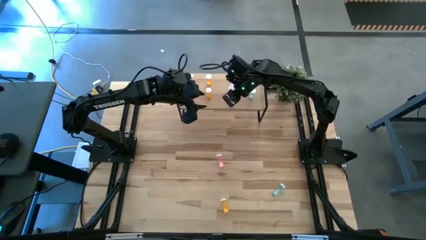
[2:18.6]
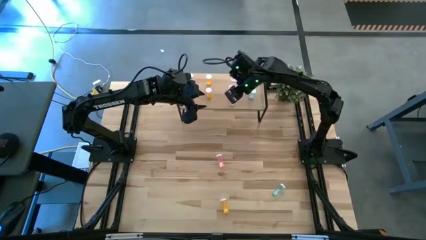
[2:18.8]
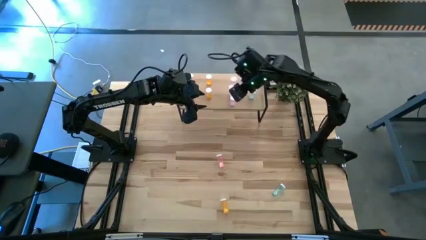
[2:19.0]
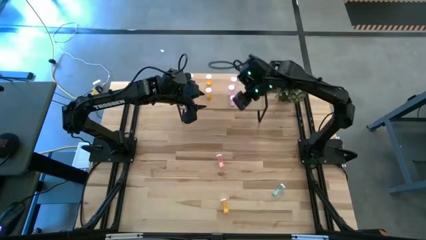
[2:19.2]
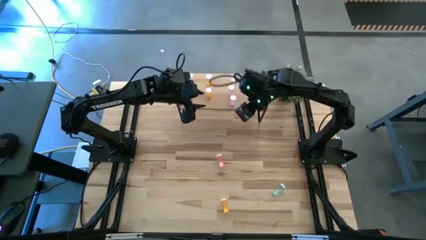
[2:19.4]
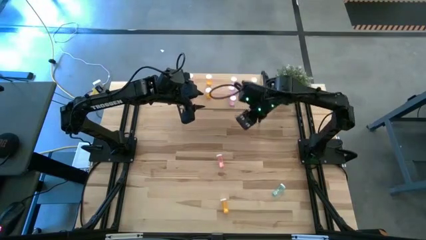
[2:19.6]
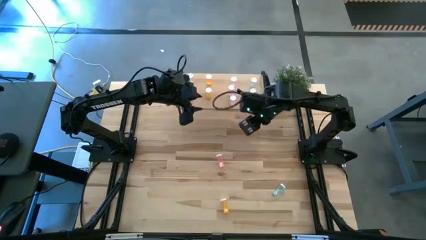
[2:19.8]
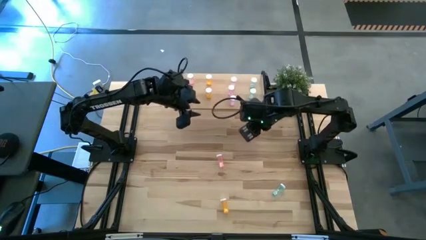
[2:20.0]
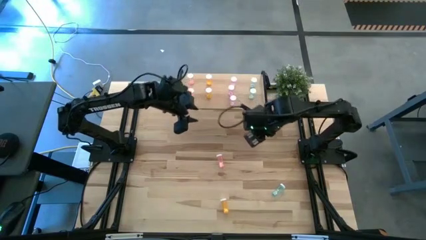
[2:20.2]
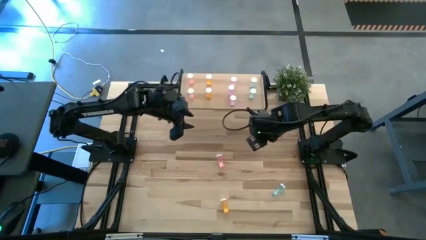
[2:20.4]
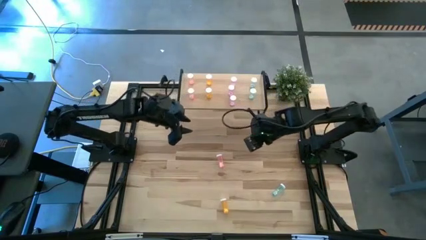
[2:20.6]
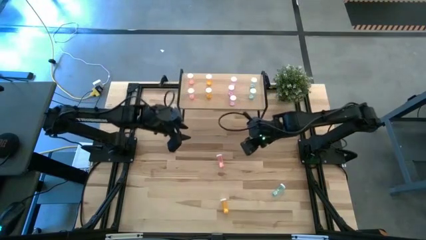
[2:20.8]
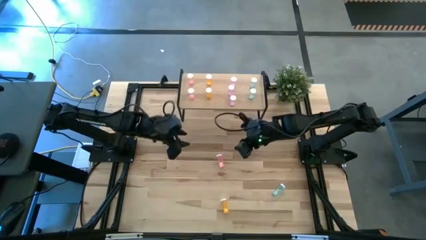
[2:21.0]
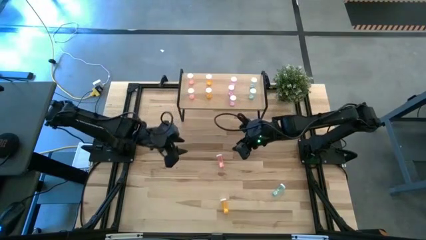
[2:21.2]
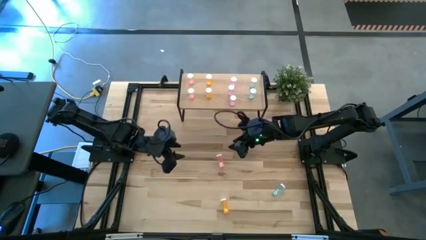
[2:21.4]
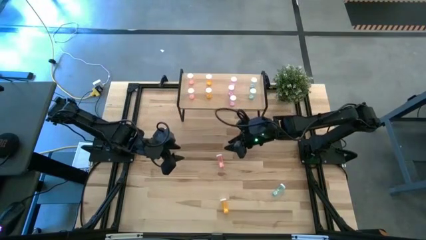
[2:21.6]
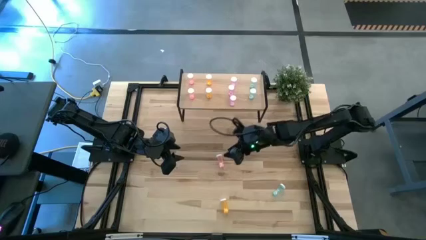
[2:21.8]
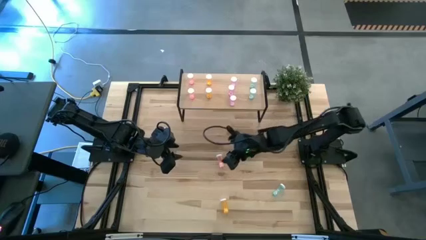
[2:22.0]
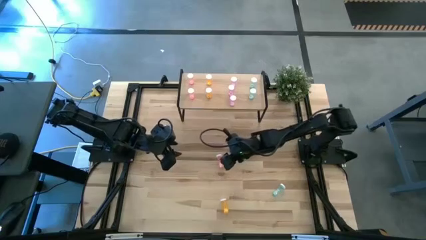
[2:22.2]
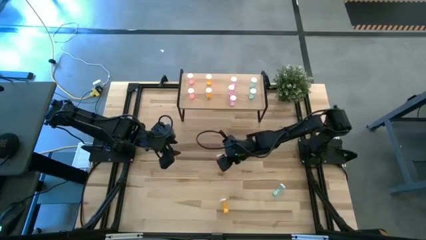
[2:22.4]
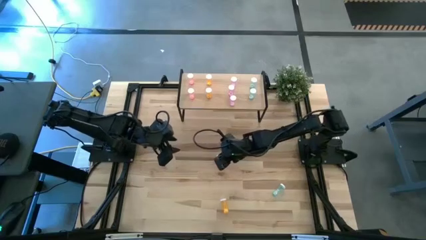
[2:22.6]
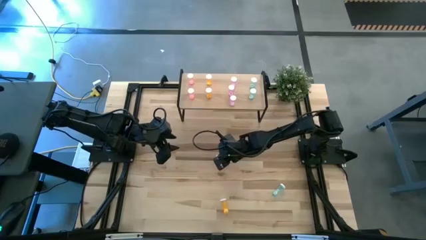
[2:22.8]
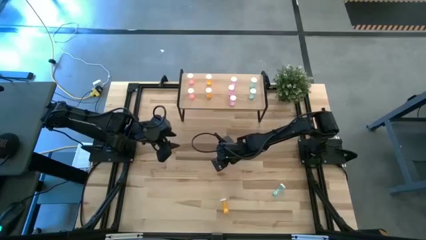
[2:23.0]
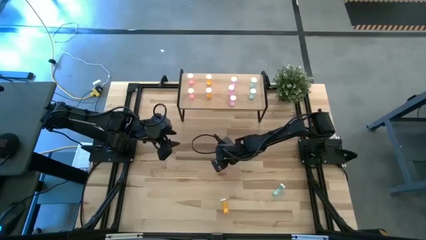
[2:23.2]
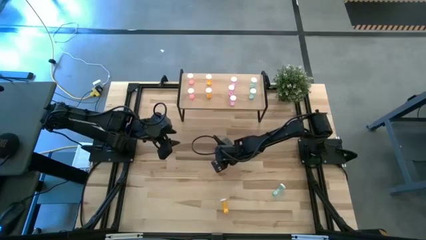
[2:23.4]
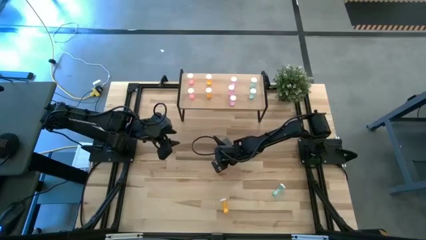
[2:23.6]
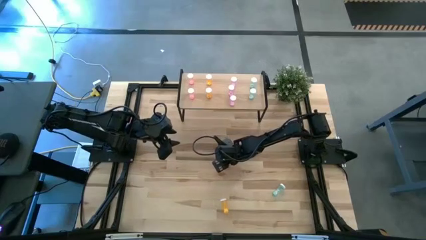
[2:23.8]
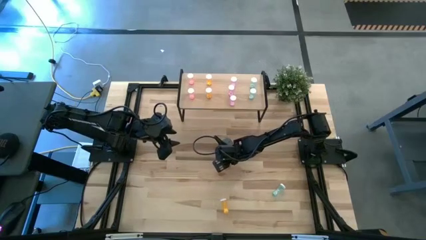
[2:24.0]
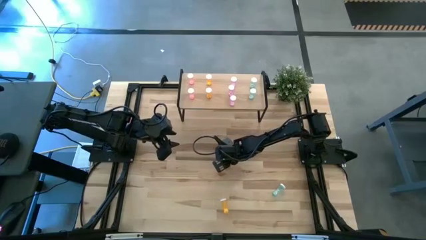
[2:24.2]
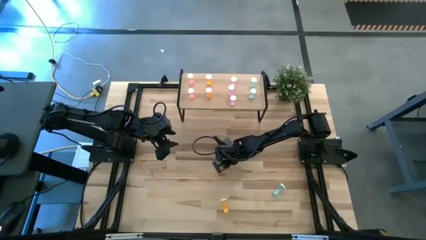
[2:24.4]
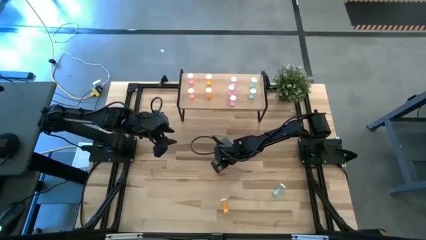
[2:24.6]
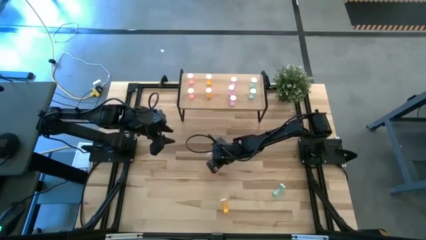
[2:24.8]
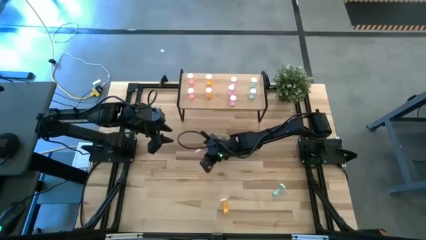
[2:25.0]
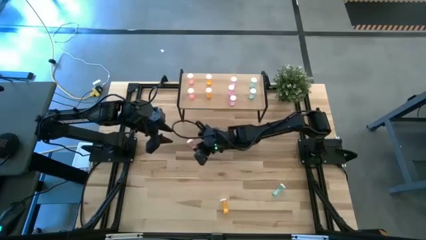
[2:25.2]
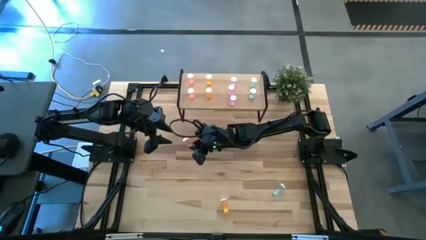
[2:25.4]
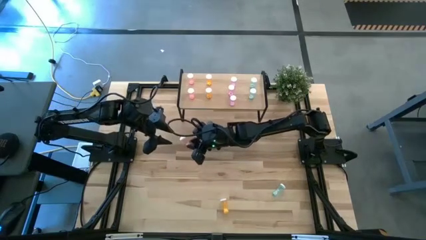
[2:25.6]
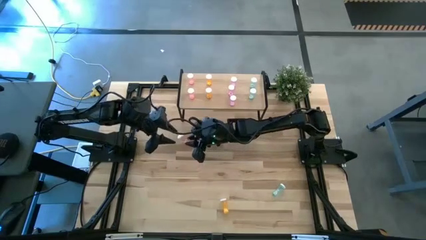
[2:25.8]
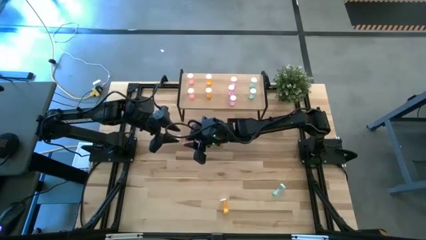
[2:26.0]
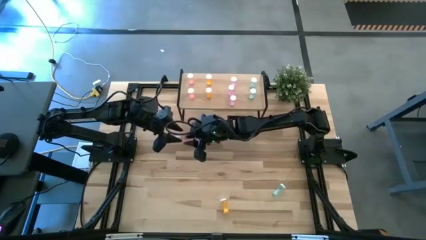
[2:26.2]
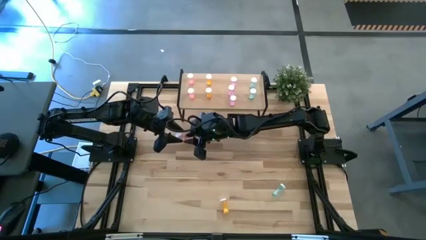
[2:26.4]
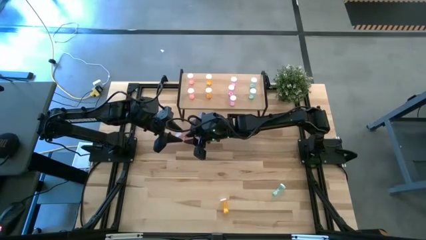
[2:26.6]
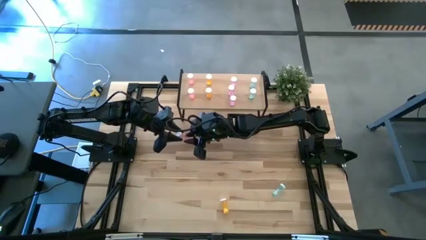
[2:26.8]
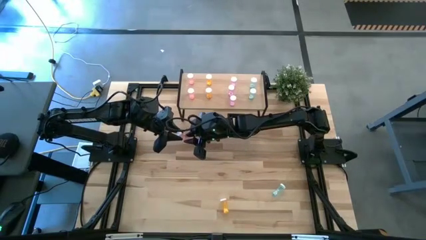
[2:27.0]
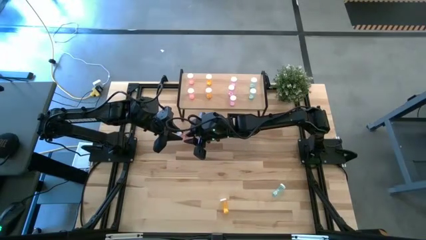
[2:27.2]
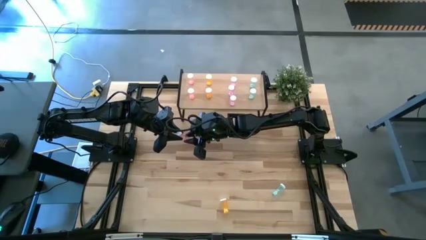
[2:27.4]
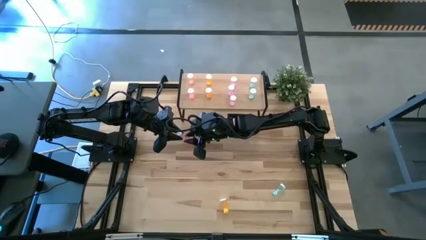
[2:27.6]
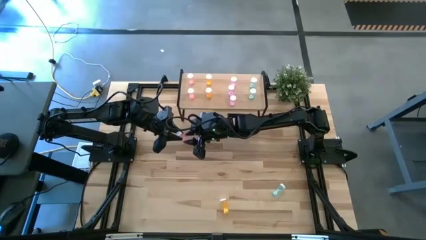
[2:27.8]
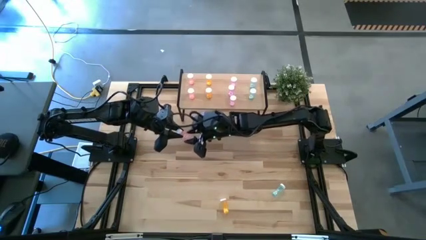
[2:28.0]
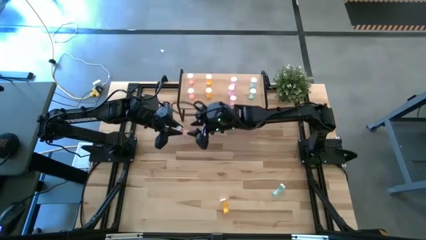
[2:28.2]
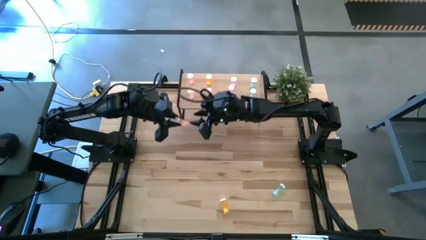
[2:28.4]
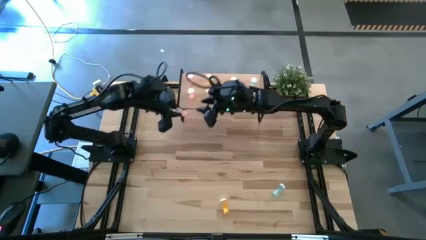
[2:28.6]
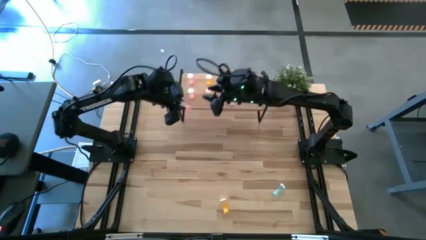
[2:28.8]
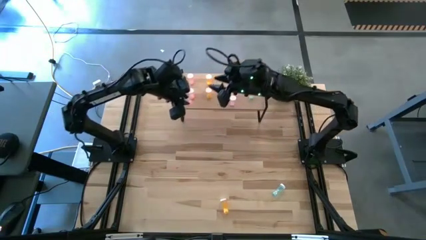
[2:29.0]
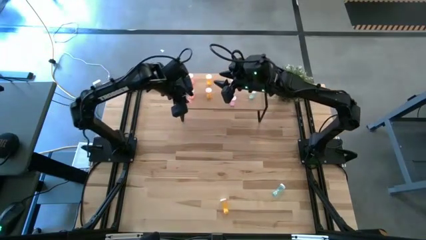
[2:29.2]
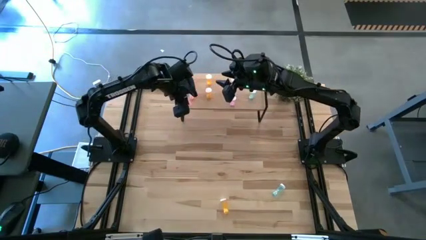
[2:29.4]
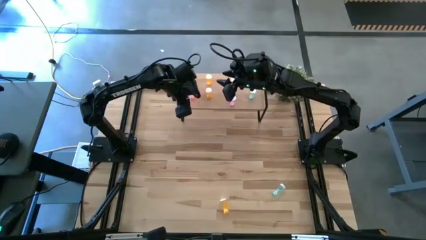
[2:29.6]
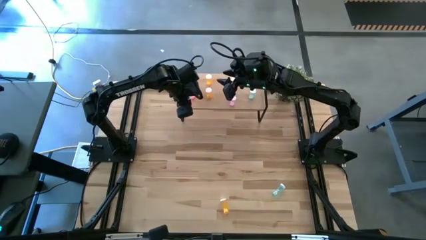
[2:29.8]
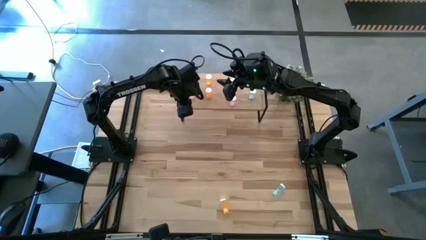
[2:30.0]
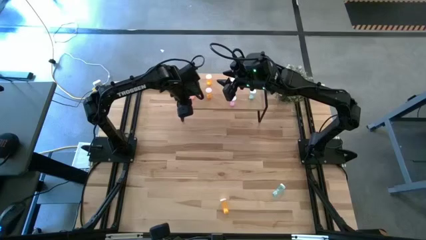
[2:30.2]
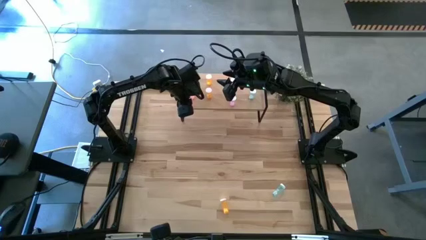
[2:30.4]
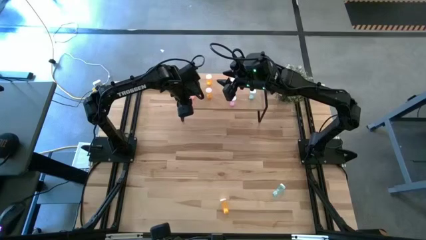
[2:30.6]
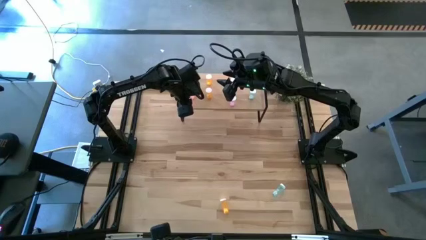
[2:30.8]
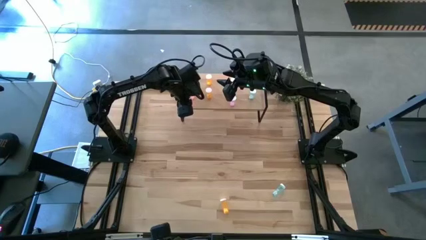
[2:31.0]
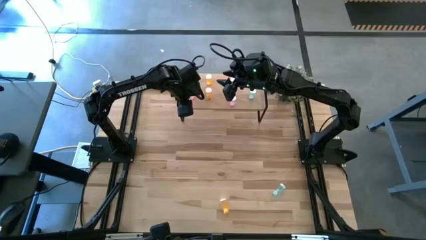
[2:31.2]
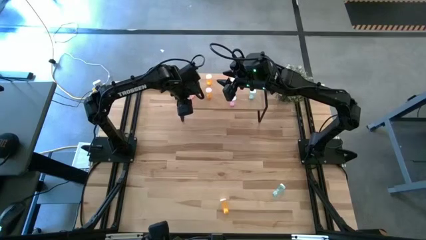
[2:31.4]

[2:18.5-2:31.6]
Task: Pick and place medicine bottles onto shelf by color
Put the red pill bottle on the shelf aligned with the other red pill bottles

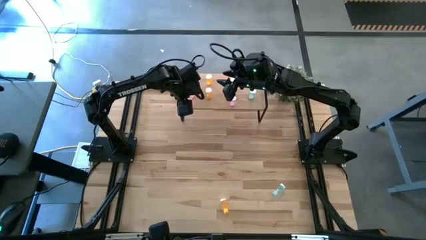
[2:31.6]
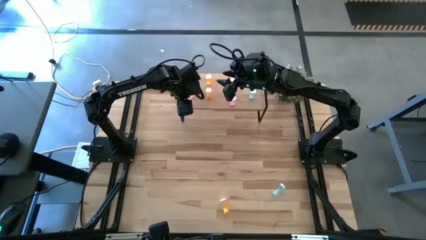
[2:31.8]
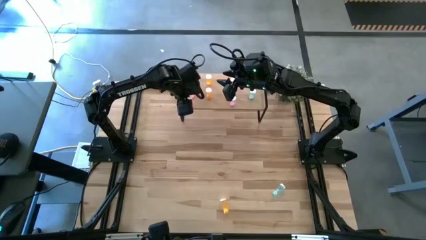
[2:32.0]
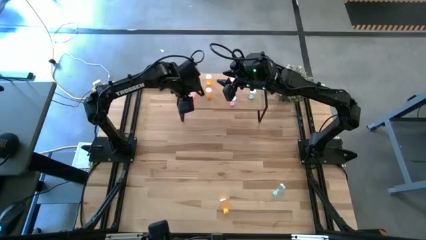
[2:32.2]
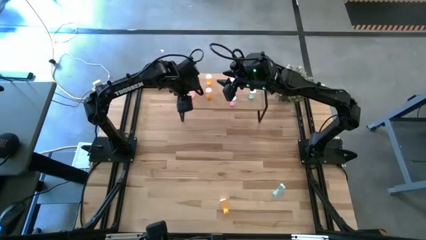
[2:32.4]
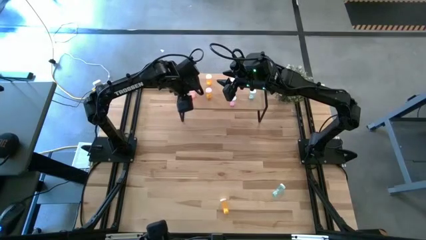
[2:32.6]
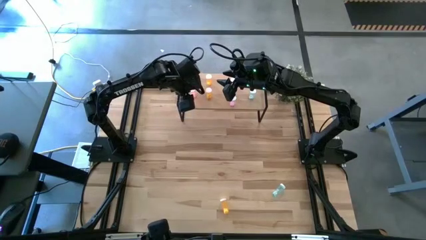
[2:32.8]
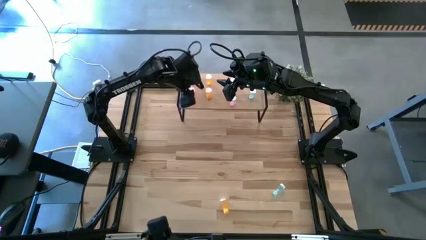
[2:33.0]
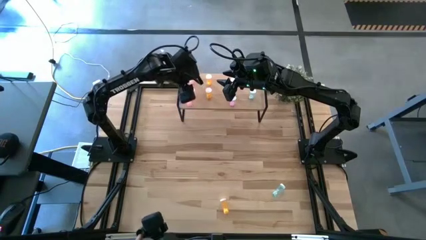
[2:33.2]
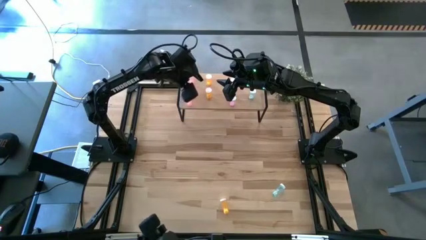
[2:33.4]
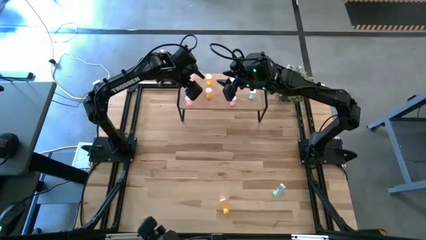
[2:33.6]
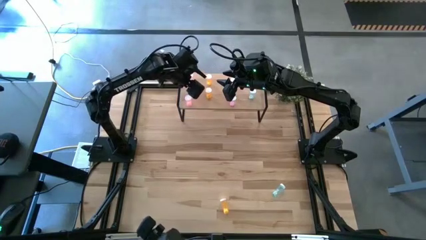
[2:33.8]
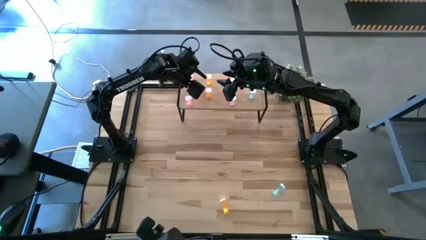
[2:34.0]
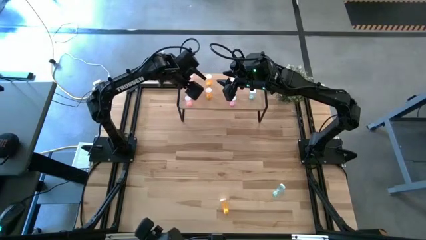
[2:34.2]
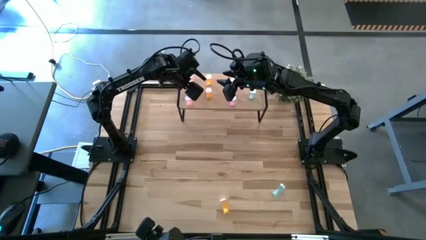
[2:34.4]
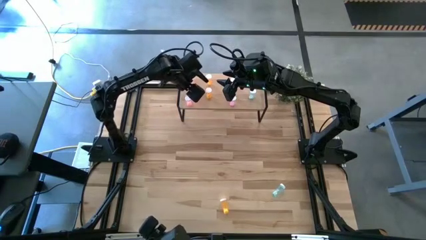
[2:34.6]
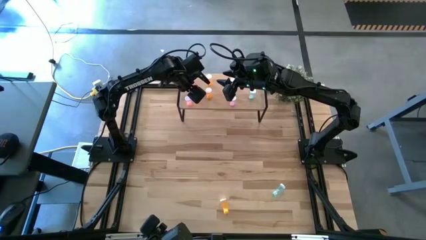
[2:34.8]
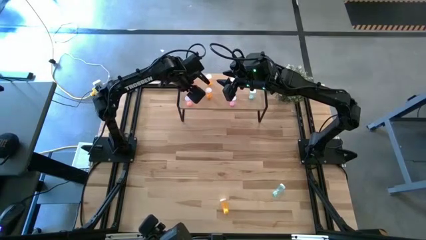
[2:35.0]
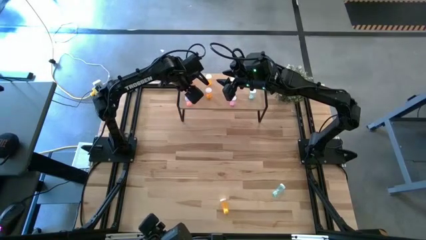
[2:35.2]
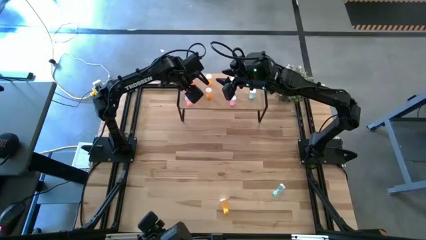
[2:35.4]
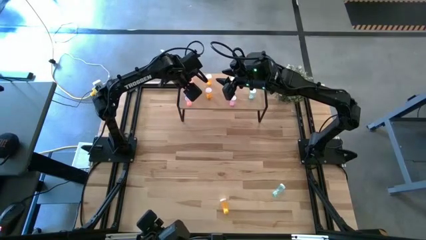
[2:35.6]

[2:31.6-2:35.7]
Adjust the red pill bottle on the shelf
